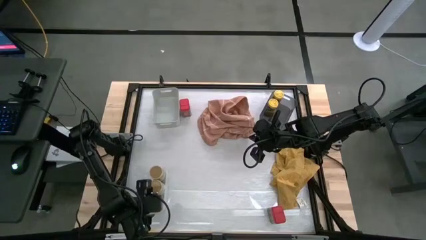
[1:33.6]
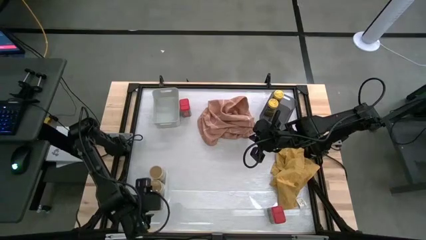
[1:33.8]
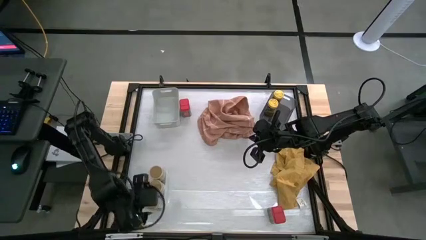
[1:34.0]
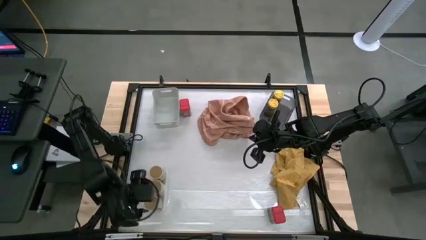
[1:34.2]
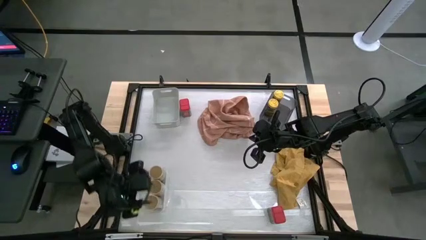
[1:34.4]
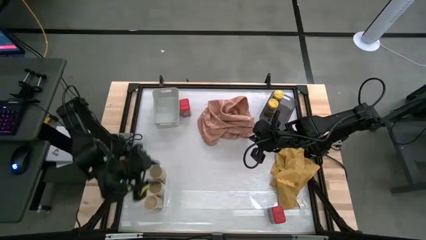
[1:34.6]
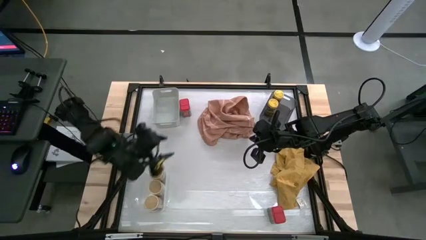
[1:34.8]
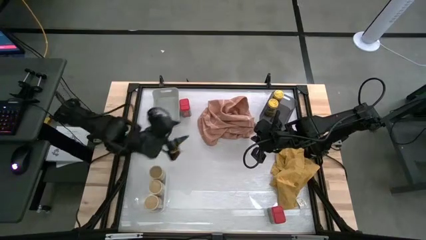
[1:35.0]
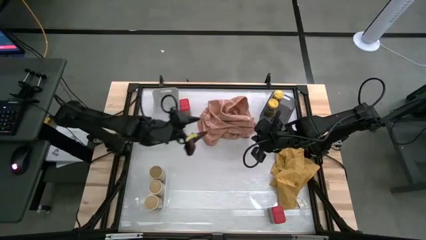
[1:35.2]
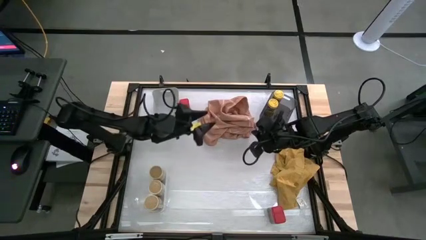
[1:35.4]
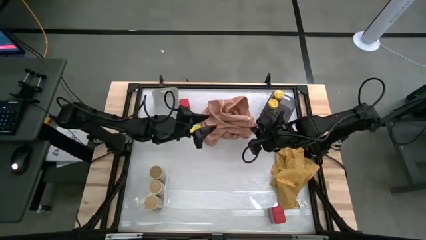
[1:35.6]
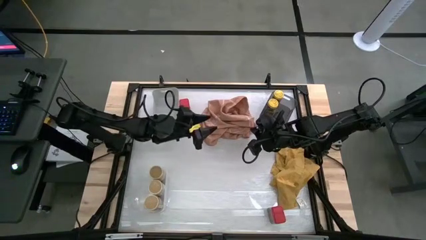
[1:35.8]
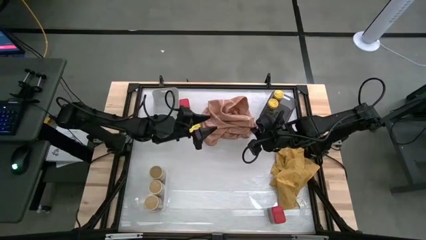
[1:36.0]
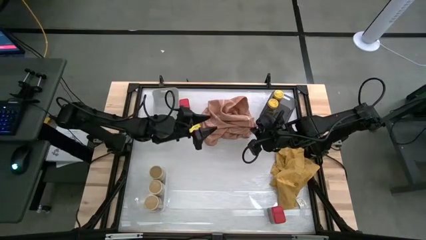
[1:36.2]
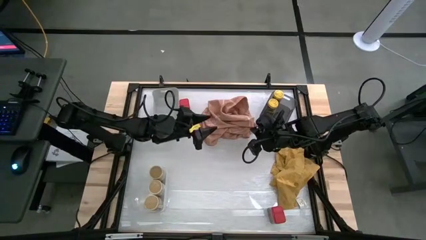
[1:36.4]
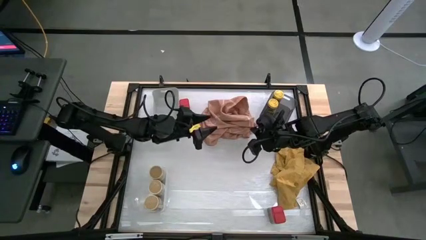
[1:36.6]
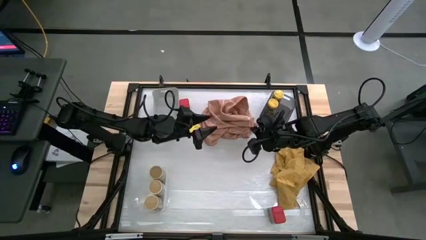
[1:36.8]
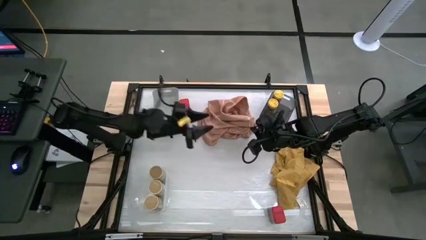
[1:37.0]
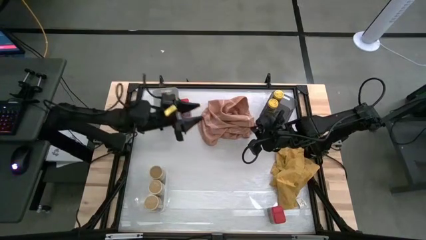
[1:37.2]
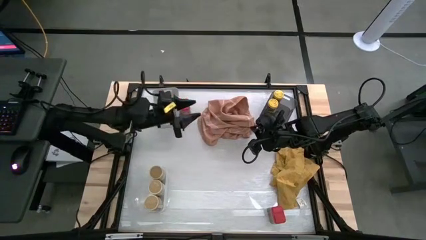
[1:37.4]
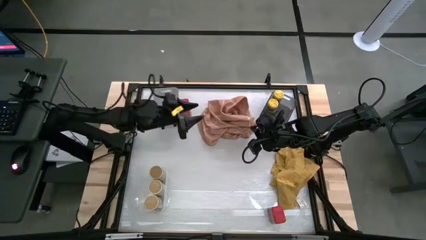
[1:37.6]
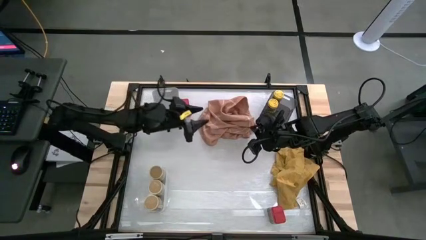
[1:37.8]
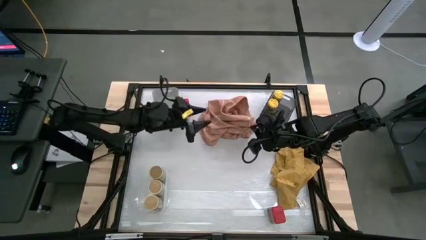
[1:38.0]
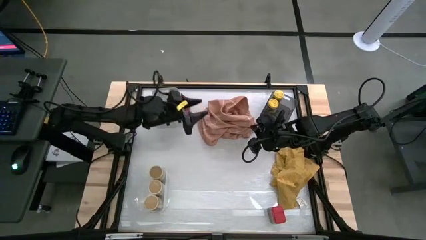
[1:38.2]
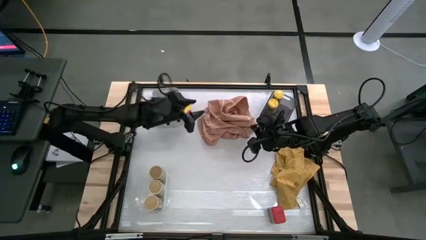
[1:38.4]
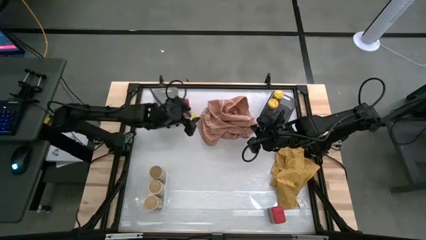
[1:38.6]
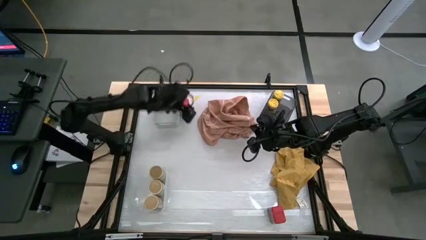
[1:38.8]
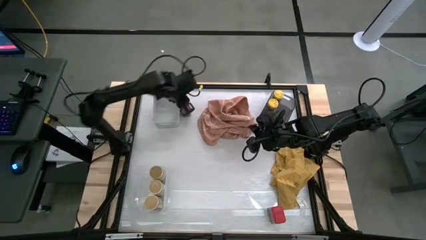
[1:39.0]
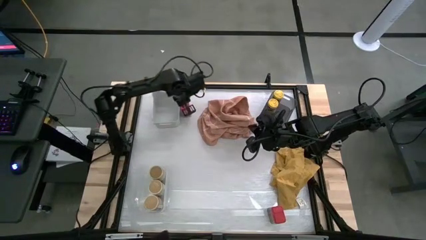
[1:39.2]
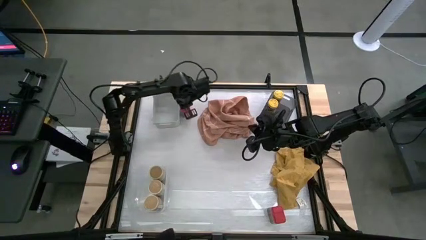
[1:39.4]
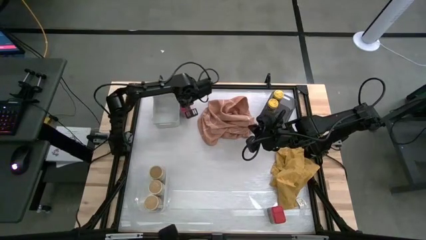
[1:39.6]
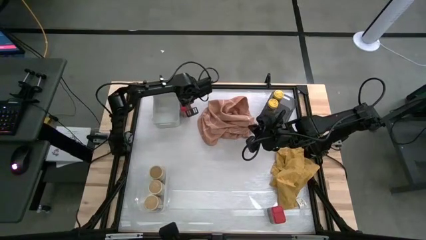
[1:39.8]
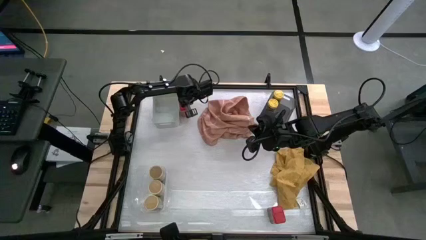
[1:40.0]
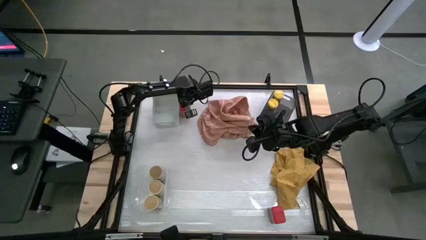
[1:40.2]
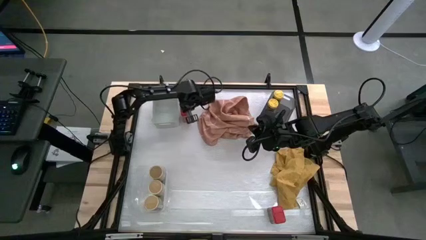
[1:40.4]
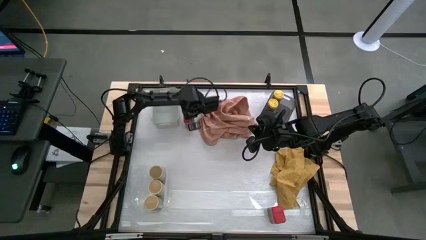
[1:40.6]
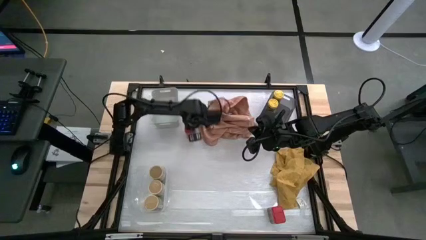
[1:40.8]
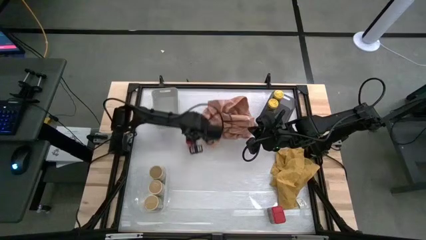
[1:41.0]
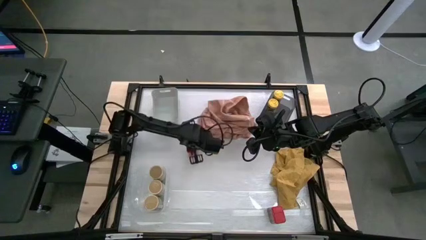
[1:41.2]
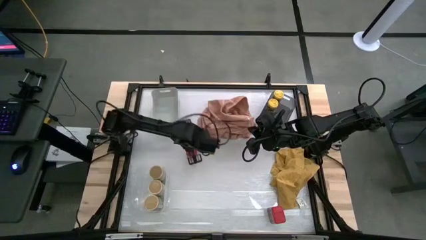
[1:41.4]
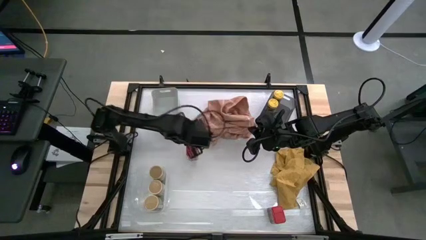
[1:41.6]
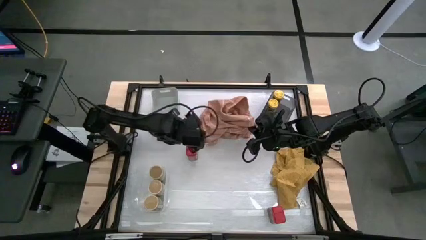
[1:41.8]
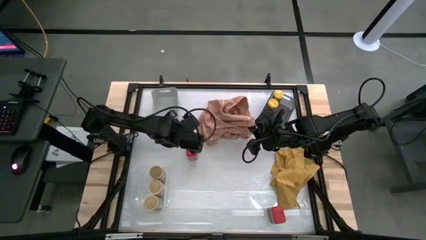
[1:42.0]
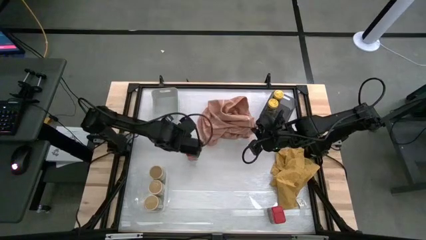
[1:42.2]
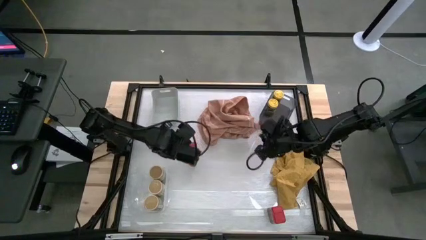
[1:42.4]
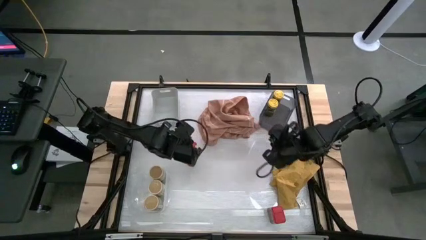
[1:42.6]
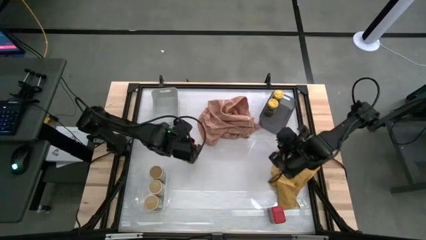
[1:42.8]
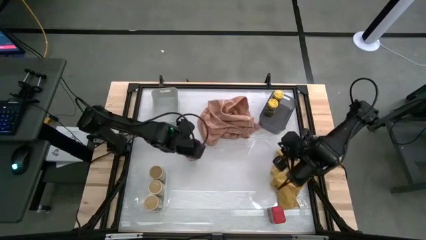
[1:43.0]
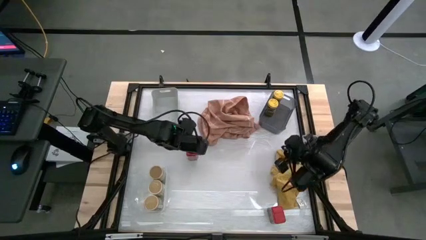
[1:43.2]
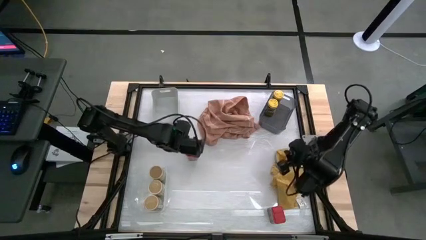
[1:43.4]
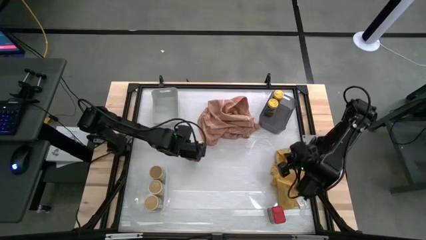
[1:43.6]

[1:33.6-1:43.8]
Task: Sort spices by type
Put the top red seasoning can into the gray bin

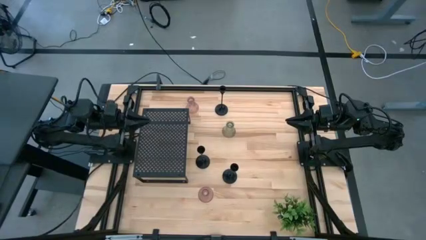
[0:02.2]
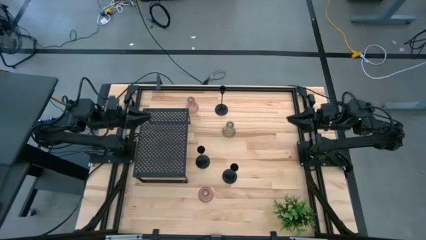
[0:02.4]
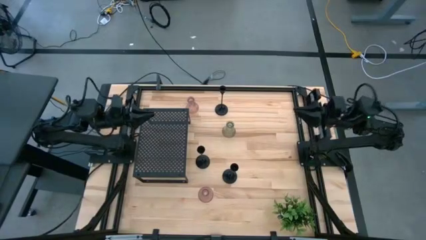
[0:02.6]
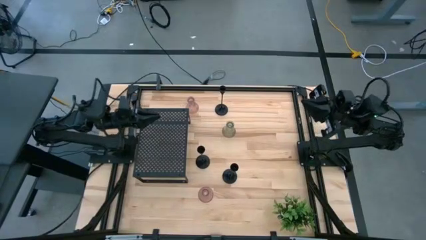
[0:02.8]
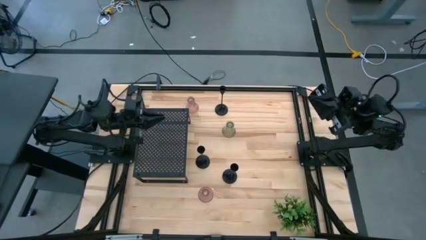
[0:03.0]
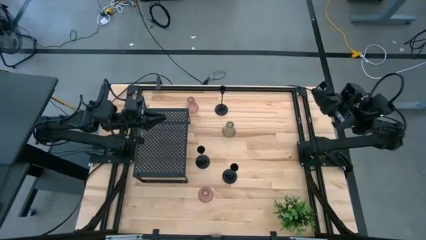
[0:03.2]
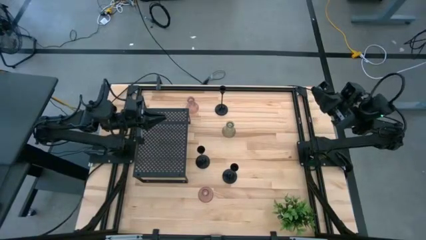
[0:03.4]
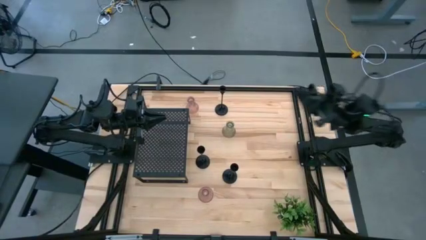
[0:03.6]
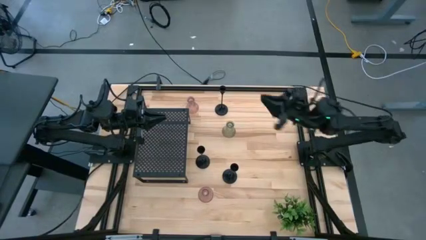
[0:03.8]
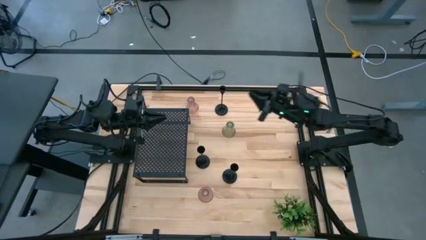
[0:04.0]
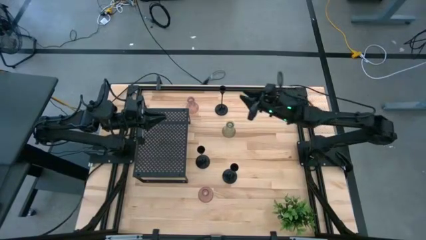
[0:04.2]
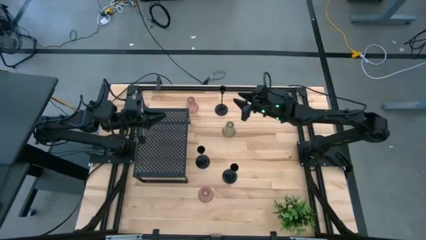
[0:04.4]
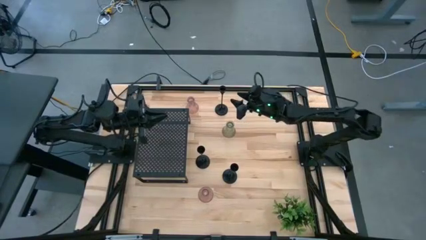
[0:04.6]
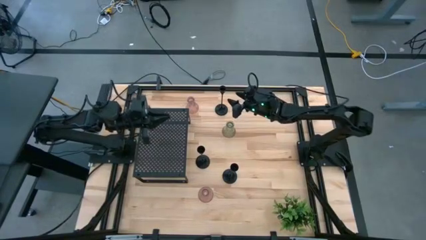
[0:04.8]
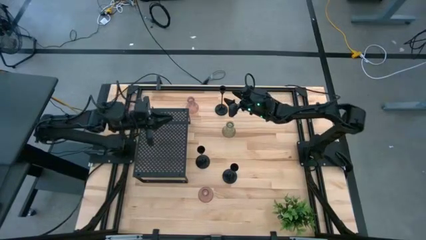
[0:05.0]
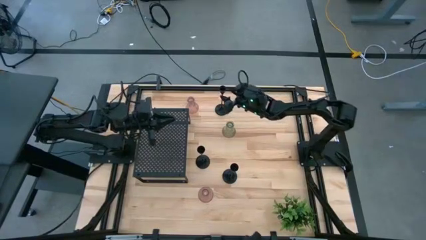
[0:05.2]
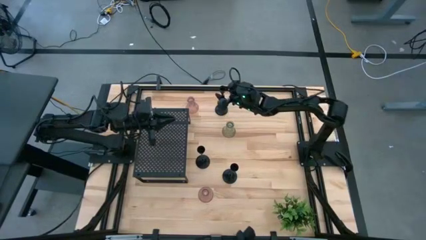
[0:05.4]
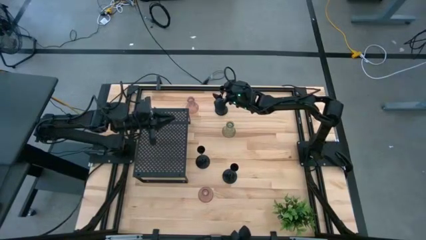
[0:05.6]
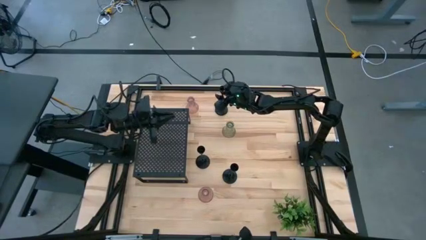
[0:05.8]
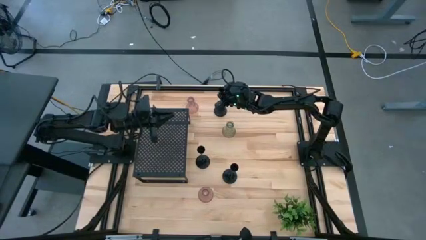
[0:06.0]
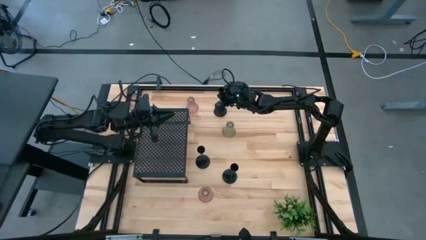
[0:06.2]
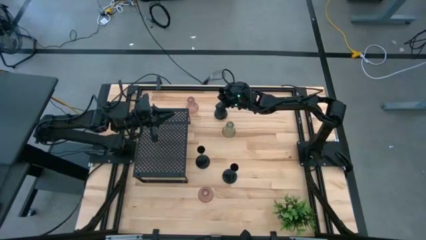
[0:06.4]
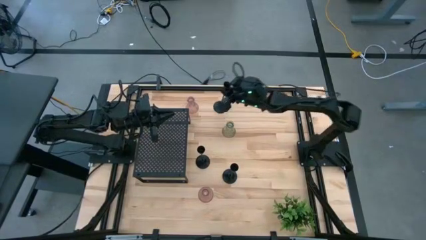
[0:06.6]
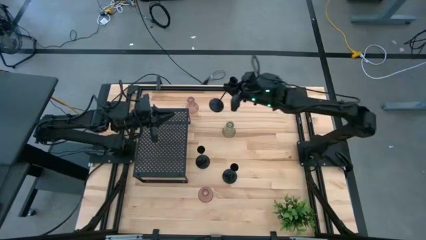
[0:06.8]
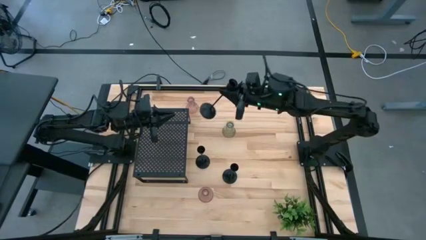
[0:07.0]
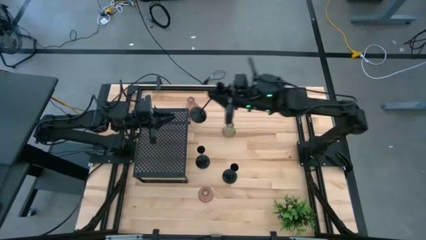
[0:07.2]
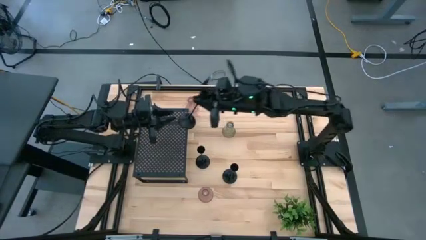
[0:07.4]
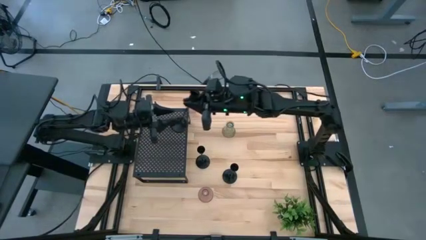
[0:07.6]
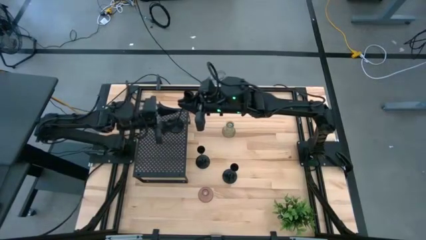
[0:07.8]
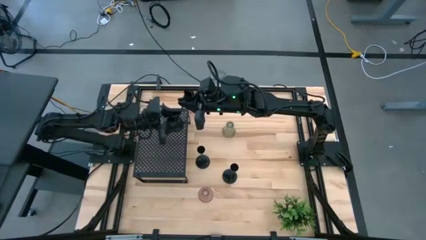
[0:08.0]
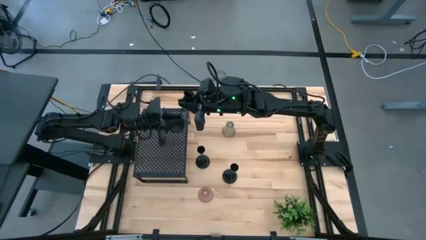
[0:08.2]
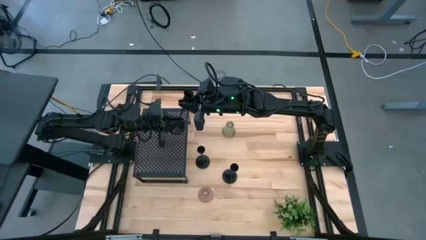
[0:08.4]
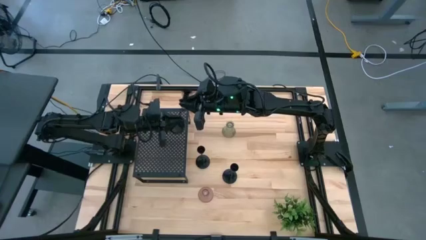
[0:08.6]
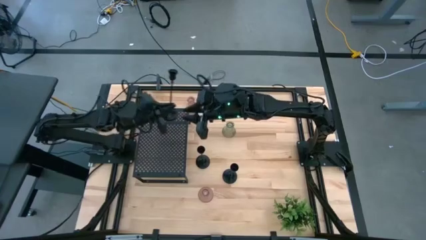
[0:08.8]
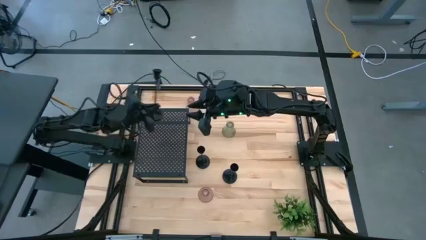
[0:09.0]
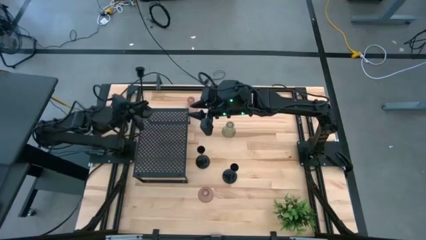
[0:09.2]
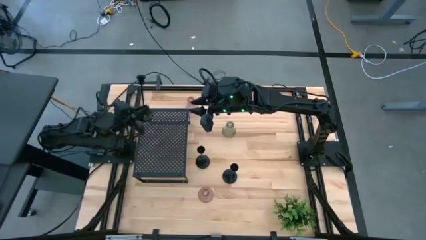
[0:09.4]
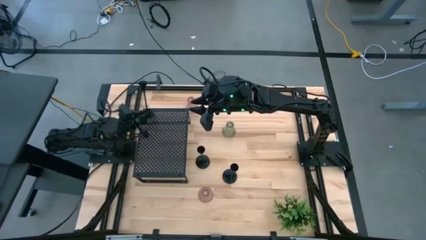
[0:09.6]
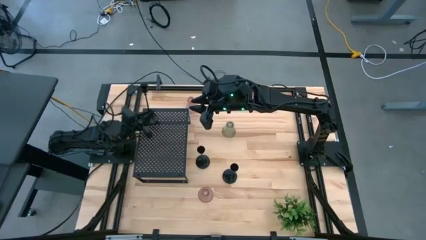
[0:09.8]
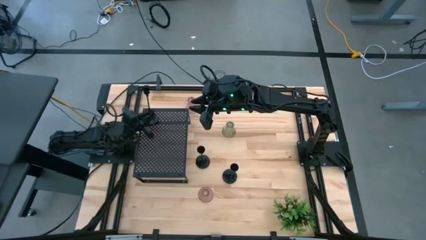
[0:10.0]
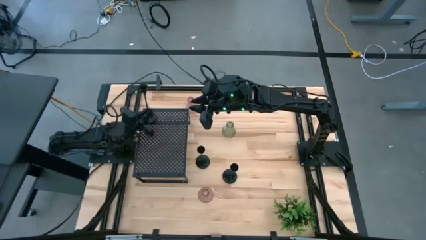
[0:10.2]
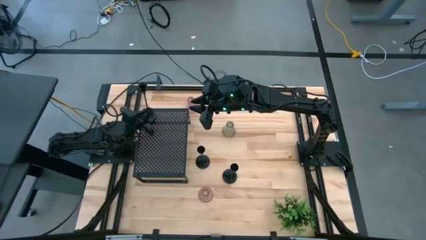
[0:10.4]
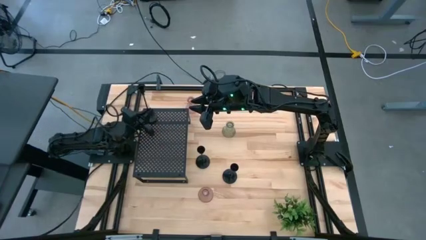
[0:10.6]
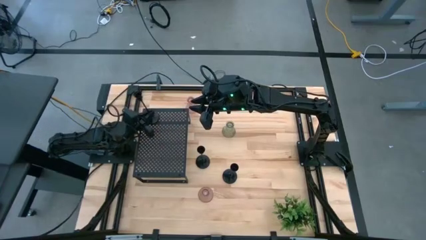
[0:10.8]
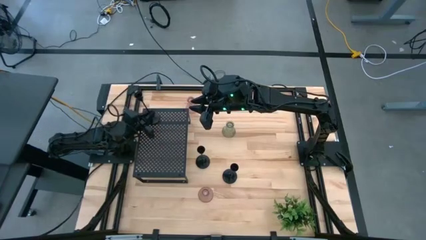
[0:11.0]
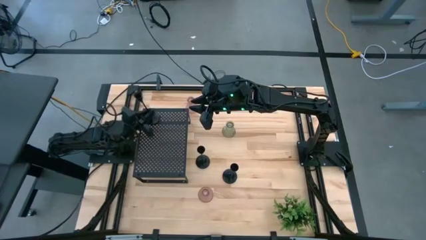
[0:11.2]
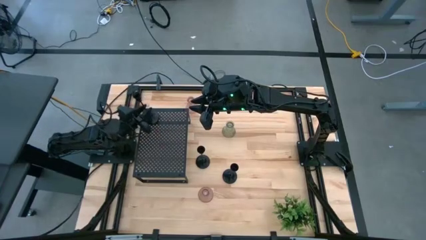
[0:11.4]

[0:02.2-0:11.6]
Task: Pick & Place candle stick holders
Put the top black candle holder on the shelf
